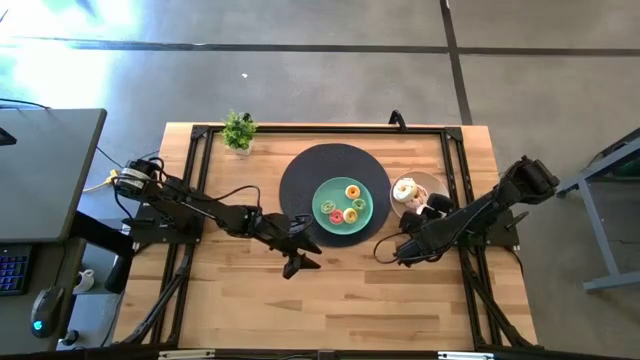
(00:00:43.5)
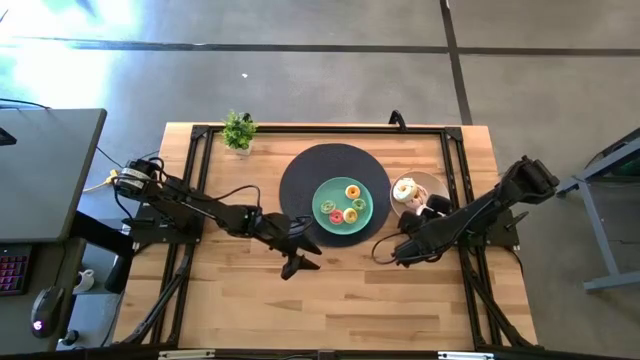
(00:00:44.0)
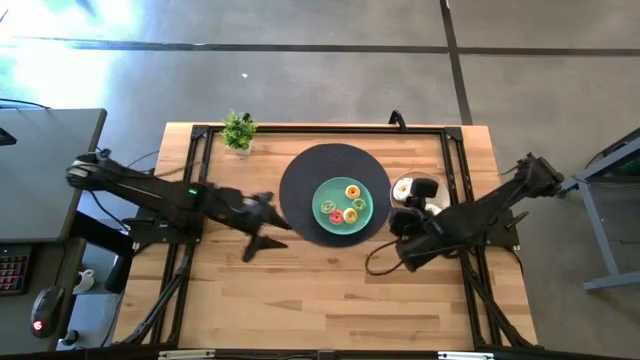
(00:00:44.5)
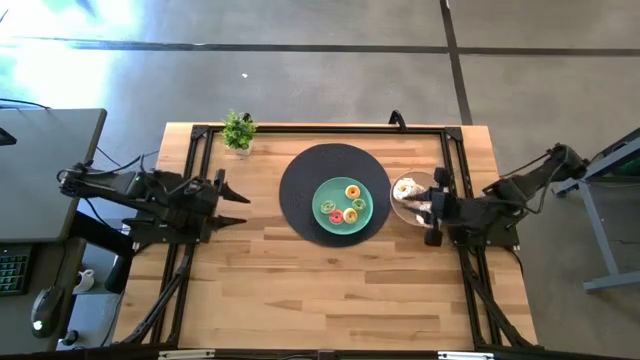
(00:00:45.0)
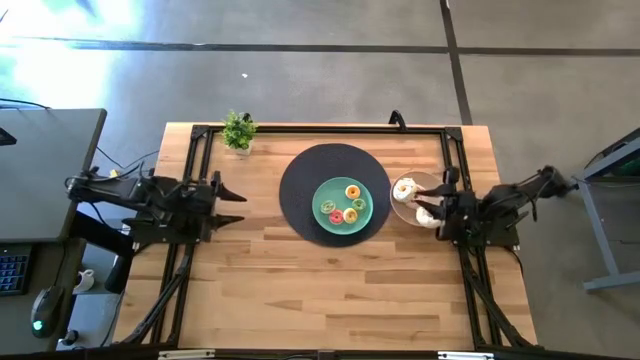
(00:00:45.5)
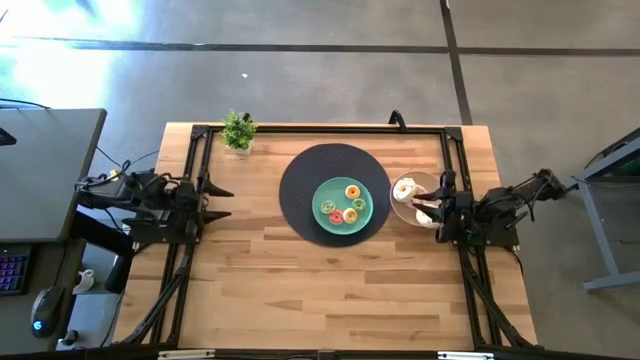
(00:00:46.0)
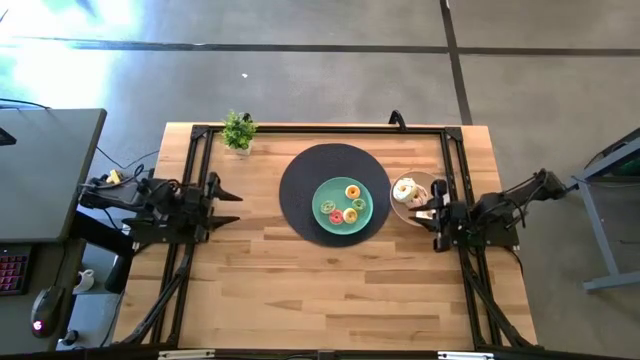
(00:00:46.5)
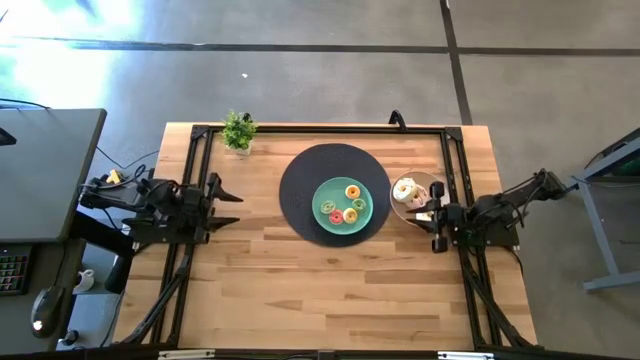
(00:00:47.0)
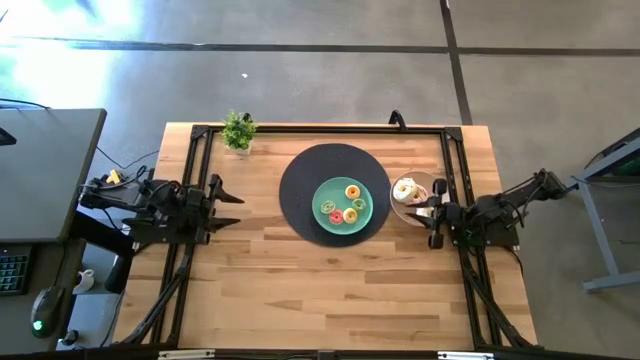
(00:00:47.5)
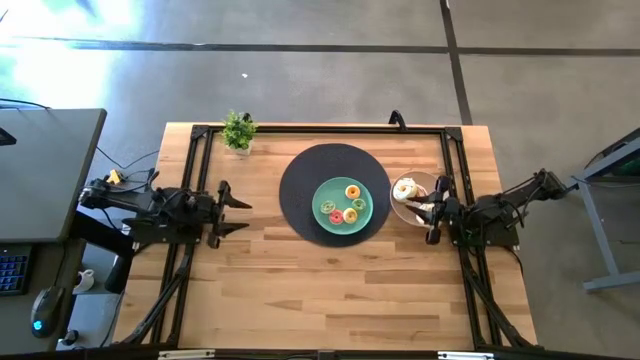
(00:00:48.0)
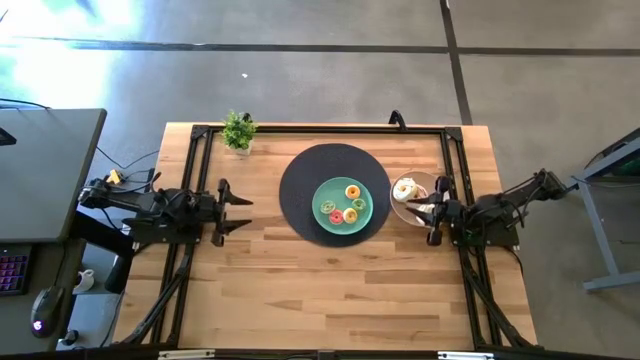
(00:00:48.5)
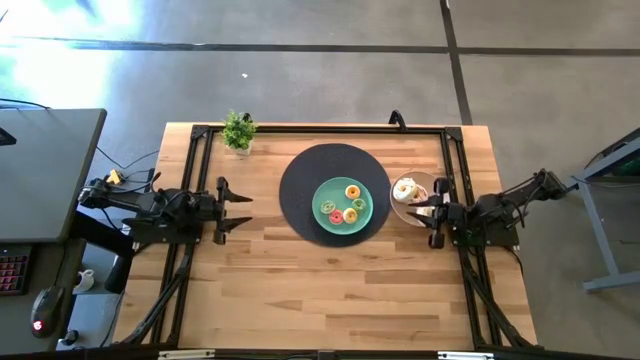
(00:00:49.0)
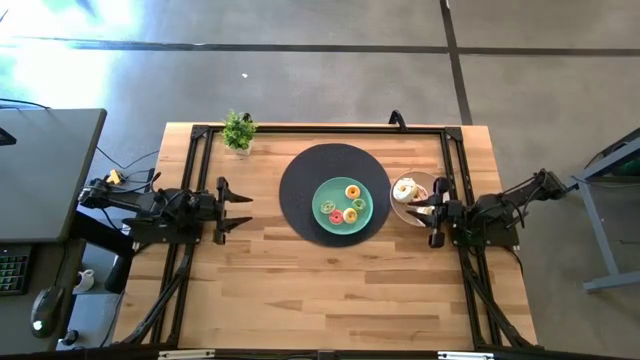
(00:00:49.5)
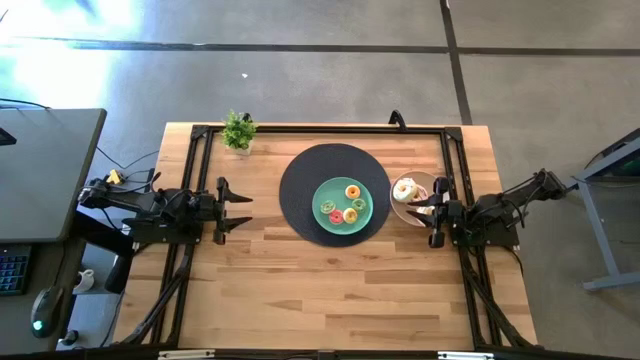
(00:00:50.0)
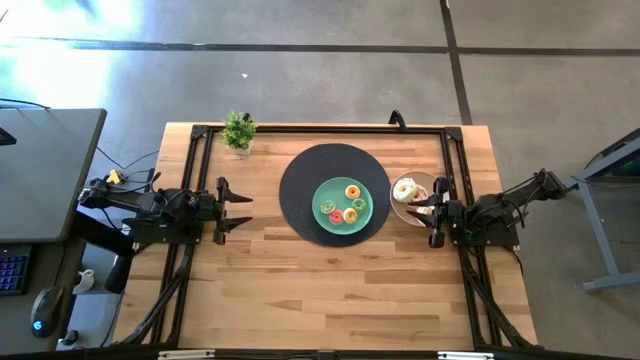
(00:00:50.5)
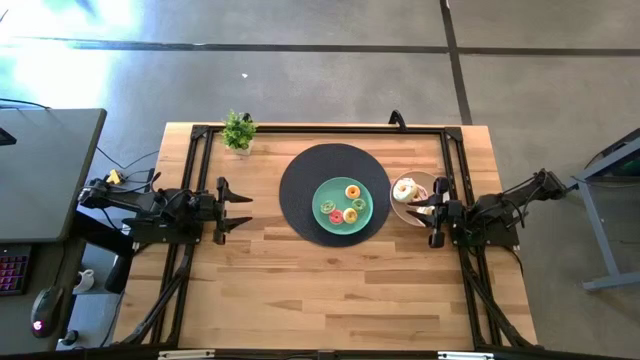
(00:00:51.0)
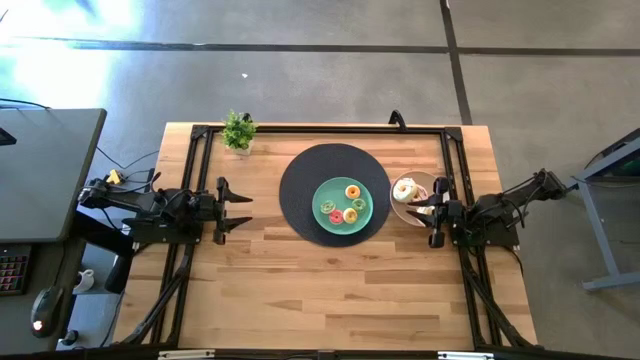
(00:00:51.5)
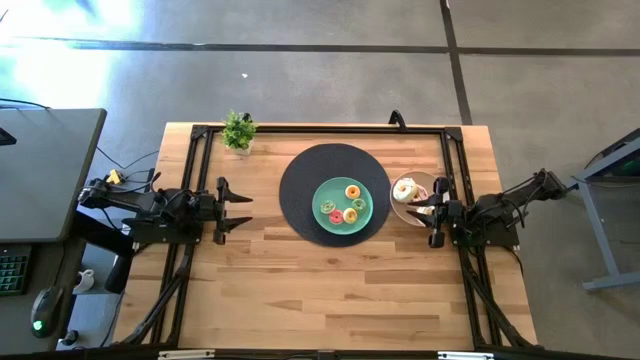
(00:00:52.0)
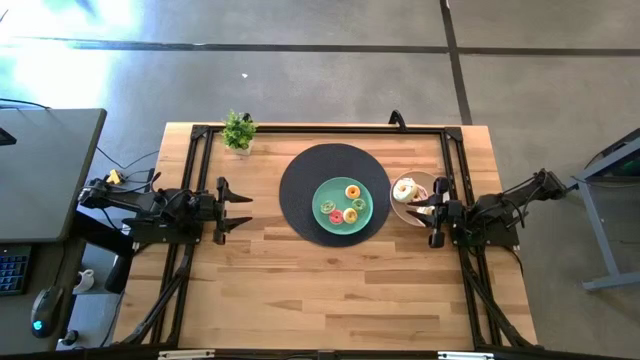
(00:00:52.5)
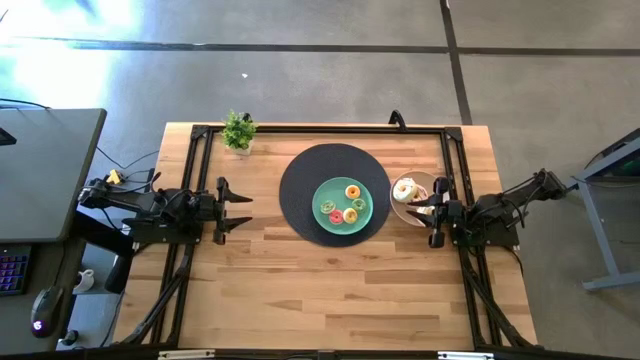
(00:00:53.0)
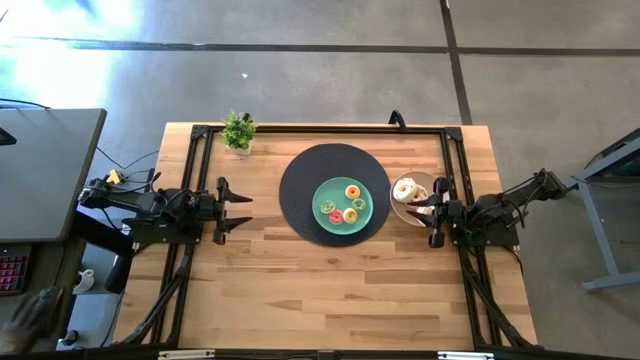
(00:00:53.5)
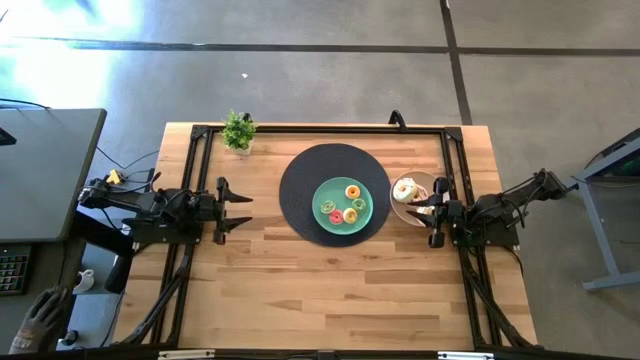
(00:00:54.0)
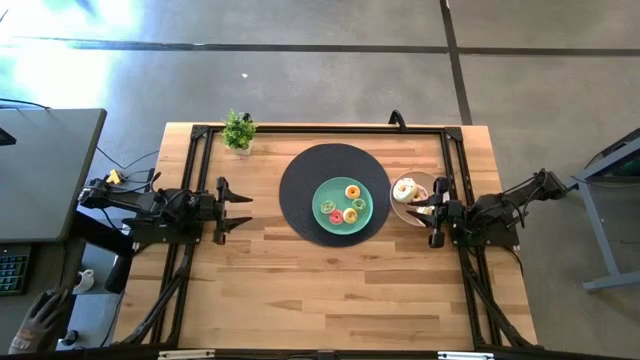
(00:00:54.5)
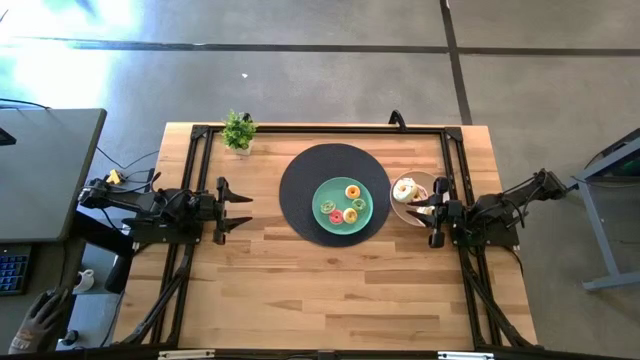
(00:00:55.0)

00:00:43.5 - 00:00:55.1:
Task: Pick & Place donuts
Return to Home Position

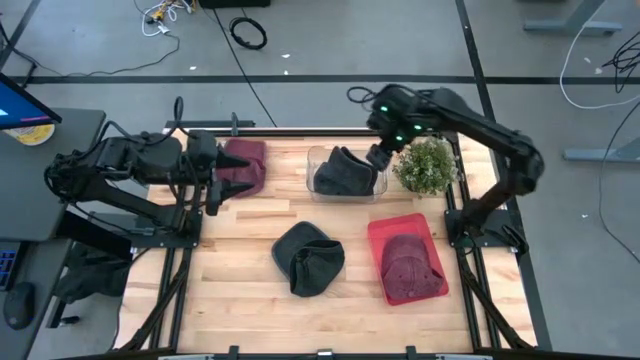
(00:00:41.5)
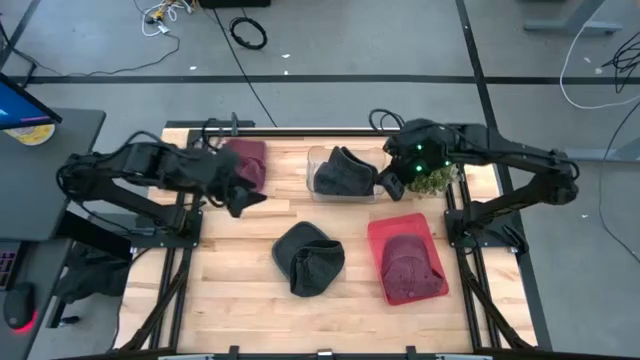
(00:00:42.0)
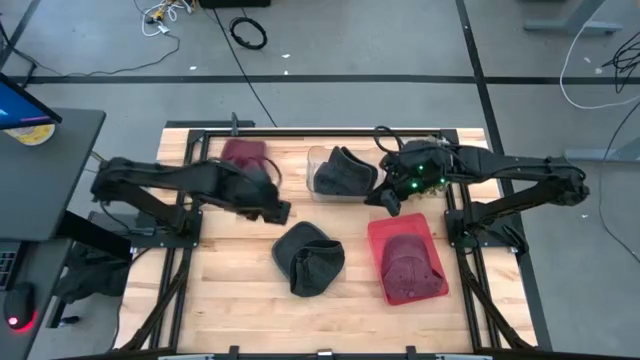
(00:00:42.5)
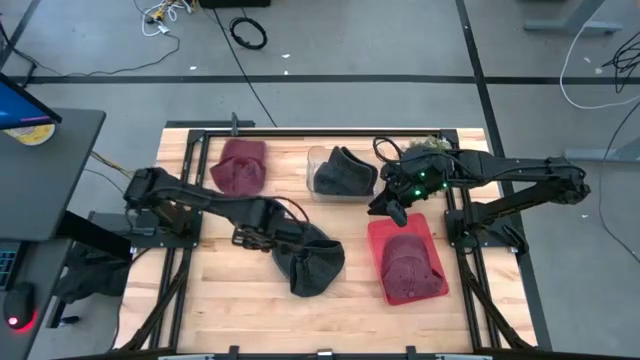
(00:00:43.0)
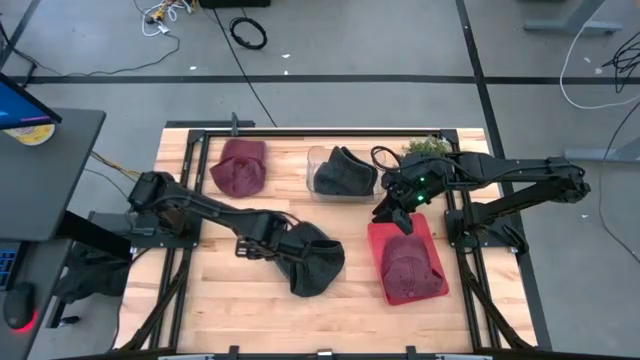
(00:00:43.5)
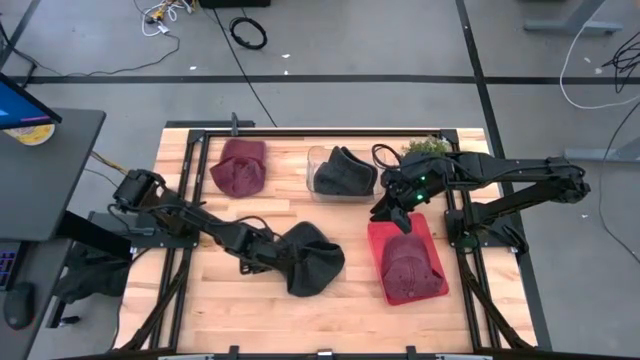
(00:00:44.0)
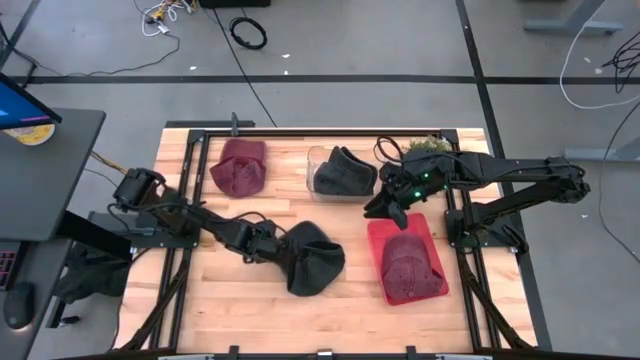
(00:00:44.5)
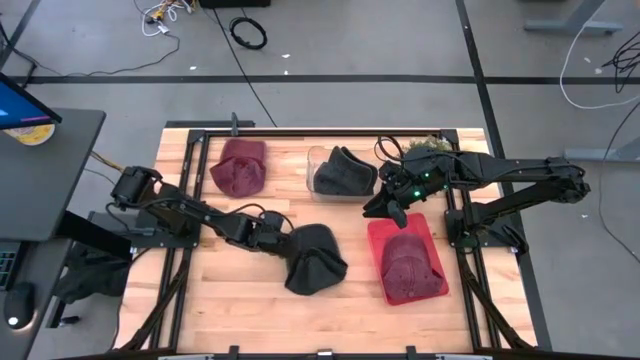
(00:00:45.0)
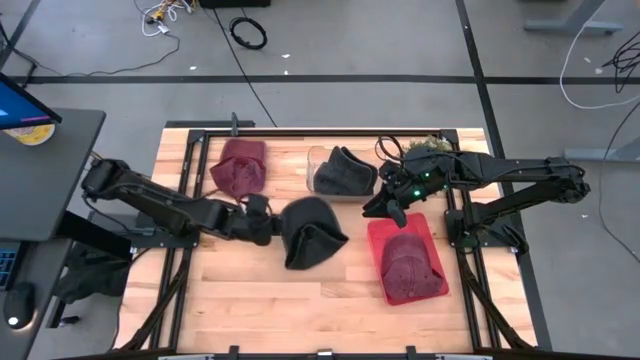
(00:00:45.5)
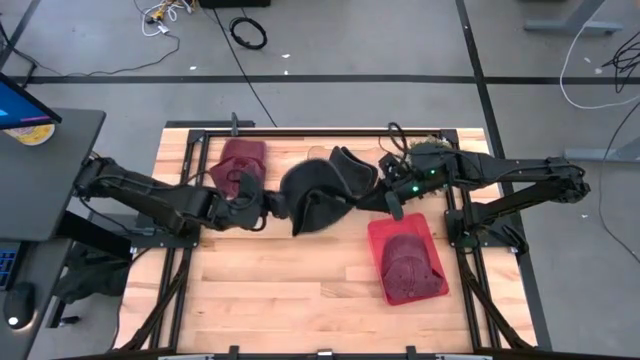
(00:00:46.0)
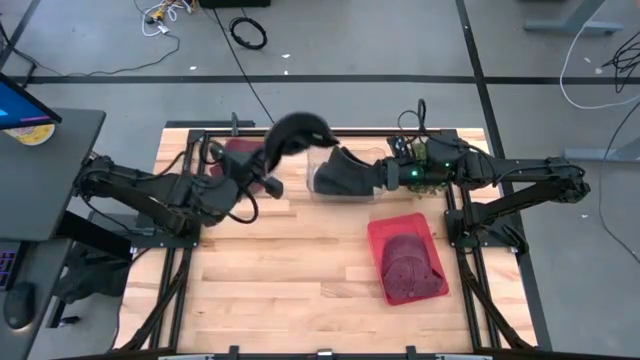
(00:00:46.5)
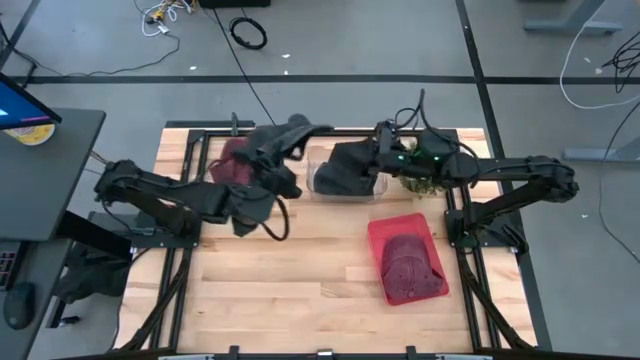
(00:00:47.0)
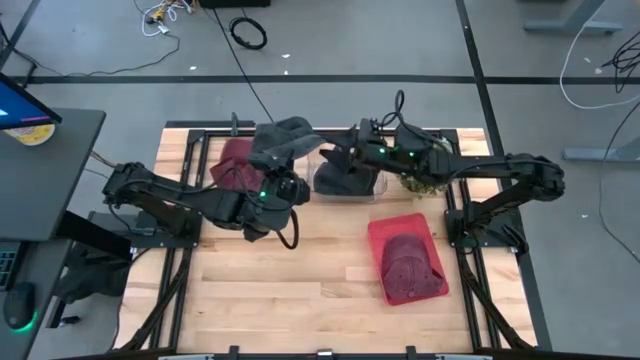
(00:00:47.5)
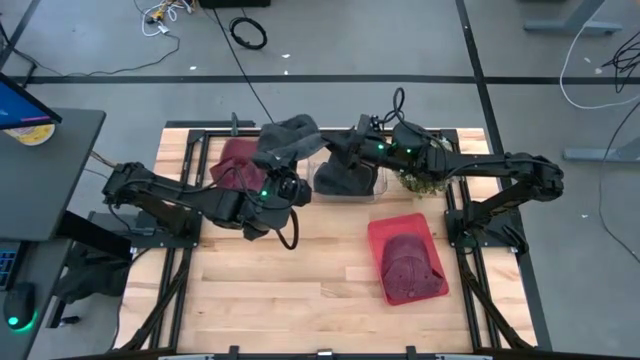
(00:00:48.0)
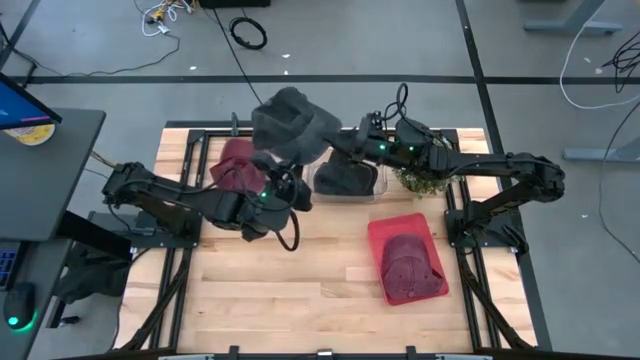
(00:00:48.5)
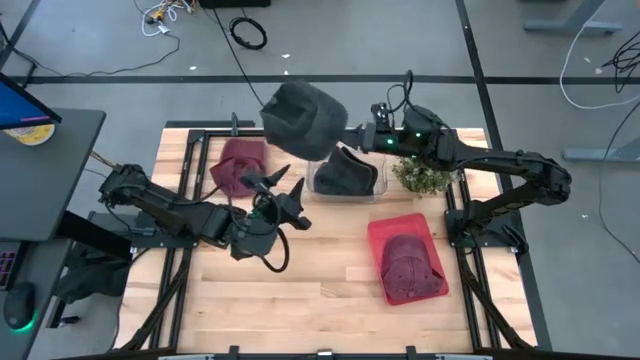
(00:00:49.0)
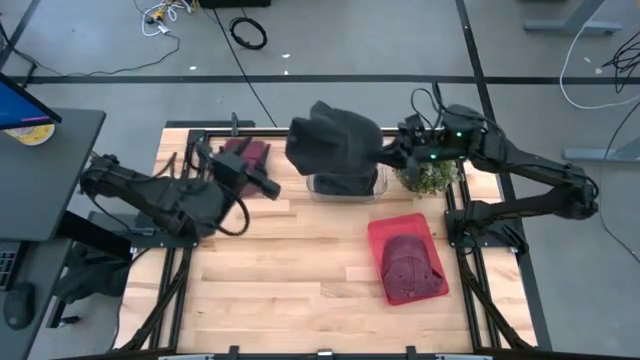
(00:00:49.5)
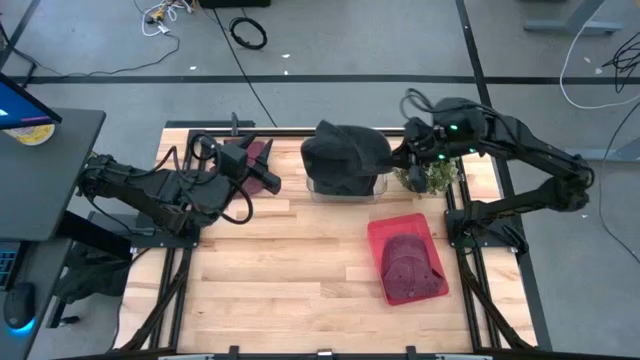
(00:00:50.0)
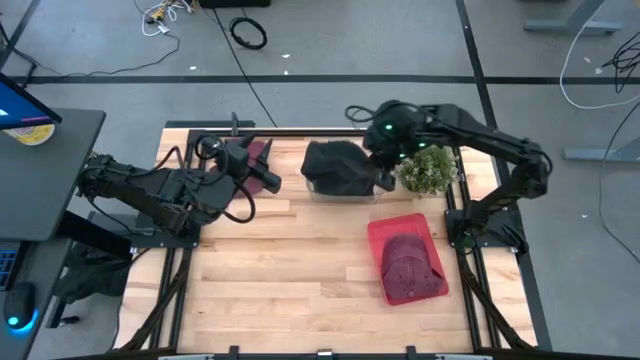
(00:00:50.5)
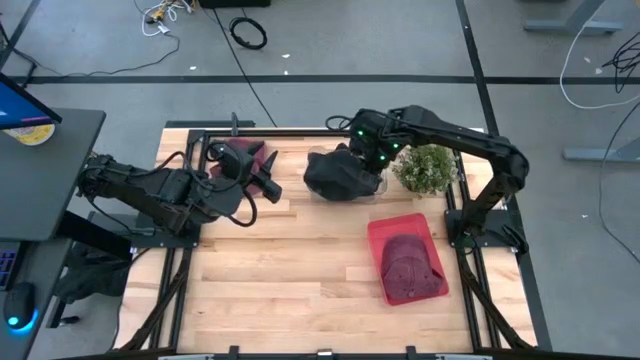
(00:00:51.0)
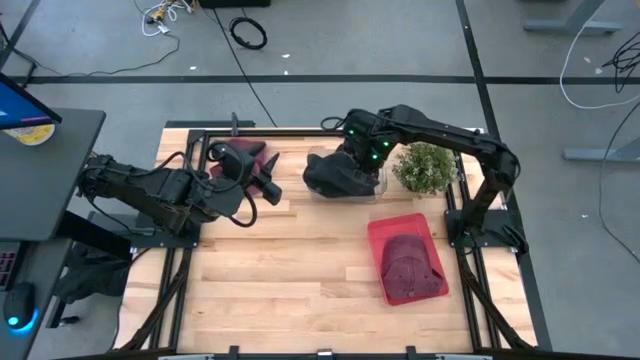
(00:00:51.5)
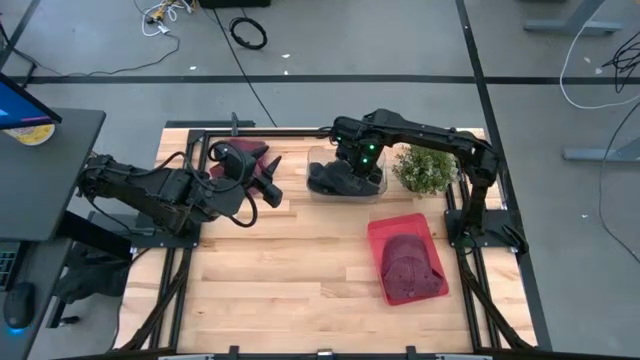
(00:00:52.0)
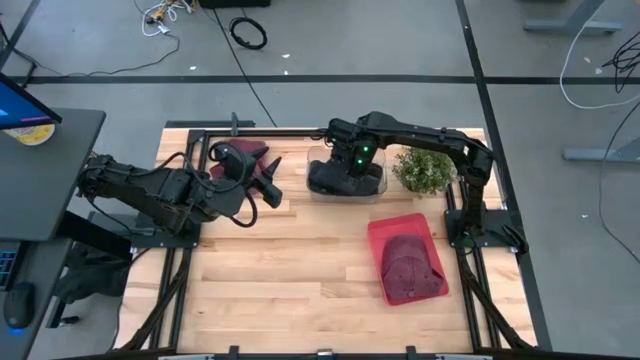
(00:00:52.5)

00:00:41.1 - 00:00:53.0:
Task: Pick & Place hat
Put the black cap into the transparent bin
